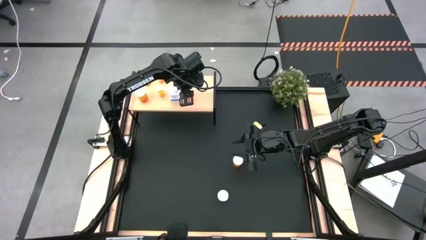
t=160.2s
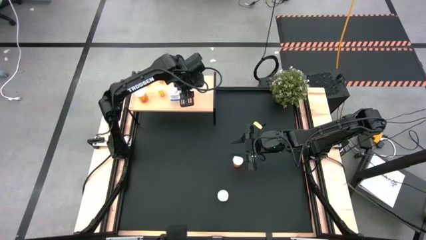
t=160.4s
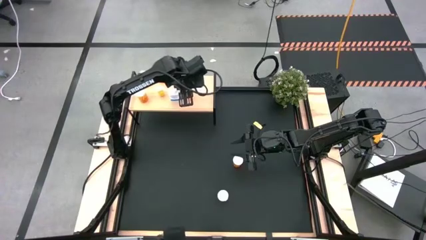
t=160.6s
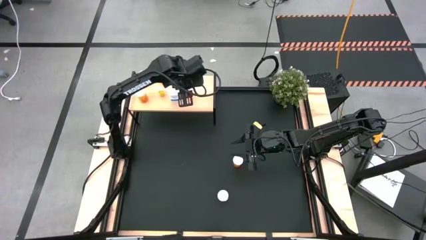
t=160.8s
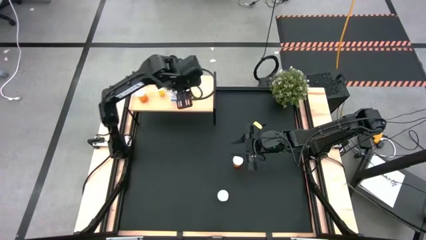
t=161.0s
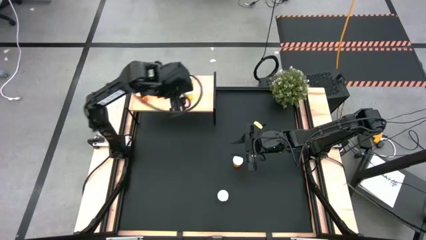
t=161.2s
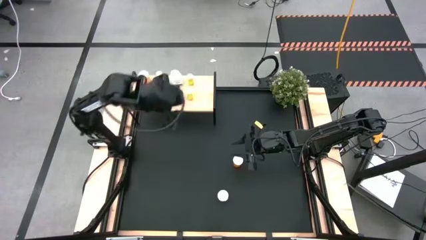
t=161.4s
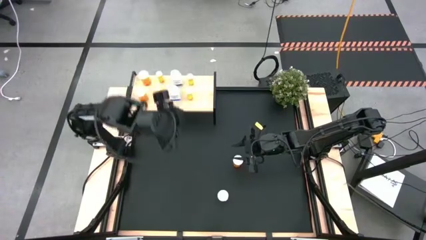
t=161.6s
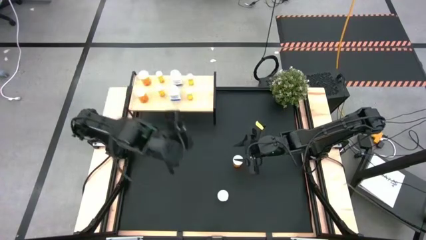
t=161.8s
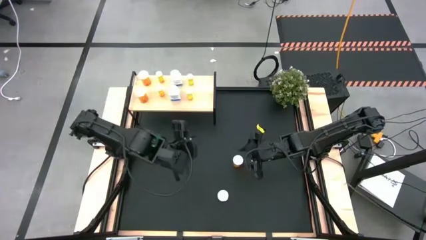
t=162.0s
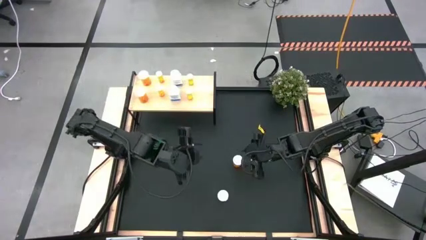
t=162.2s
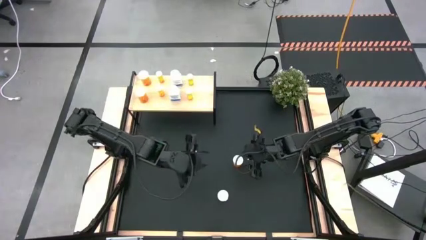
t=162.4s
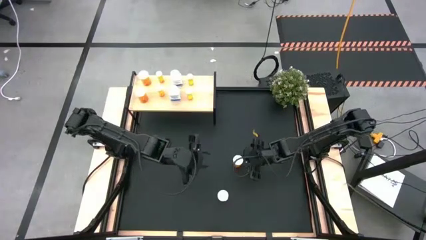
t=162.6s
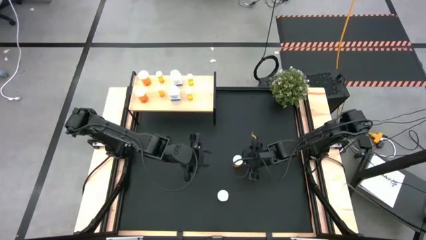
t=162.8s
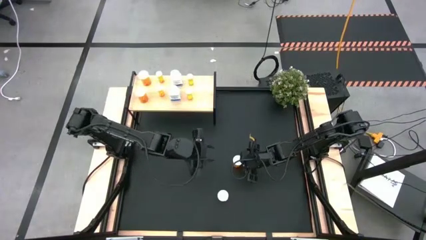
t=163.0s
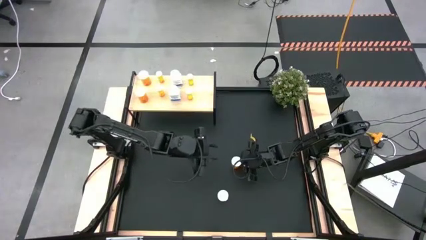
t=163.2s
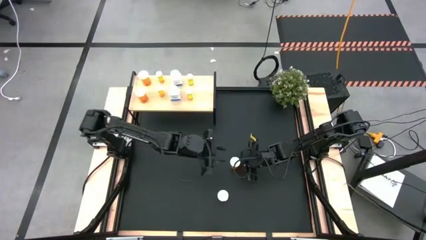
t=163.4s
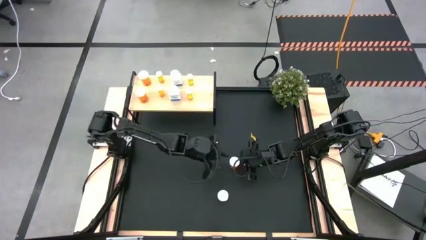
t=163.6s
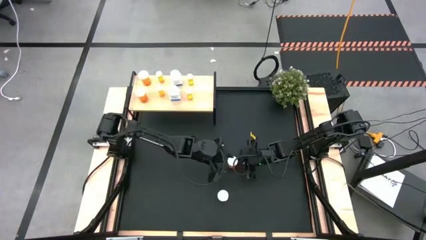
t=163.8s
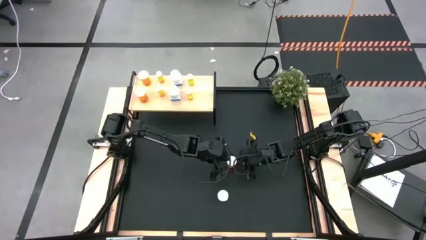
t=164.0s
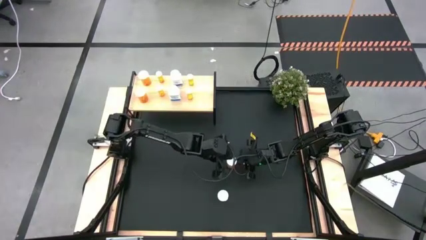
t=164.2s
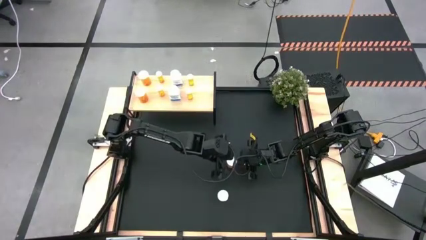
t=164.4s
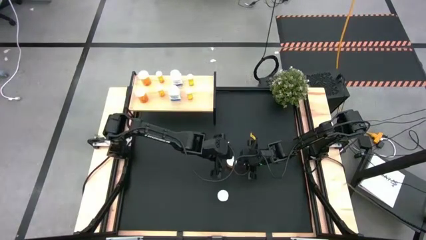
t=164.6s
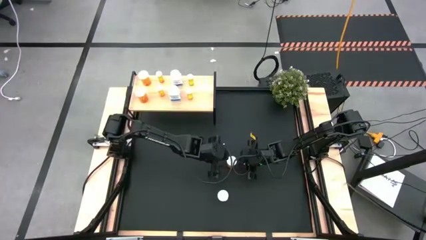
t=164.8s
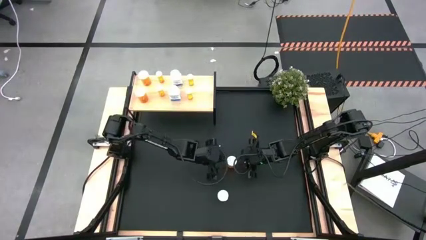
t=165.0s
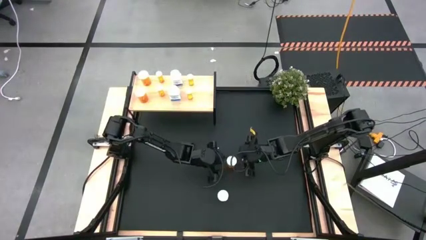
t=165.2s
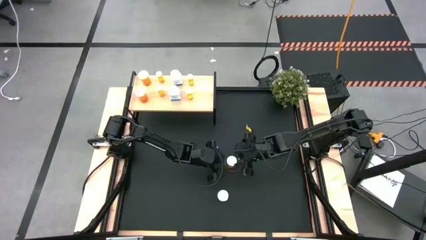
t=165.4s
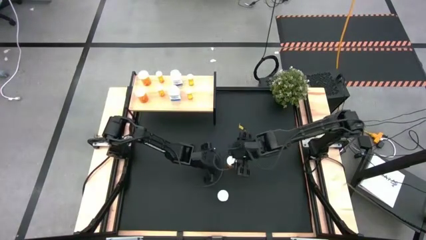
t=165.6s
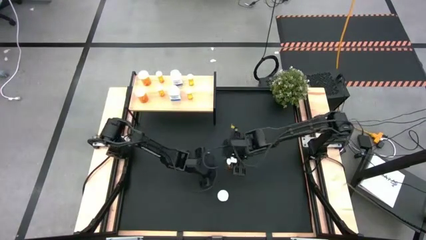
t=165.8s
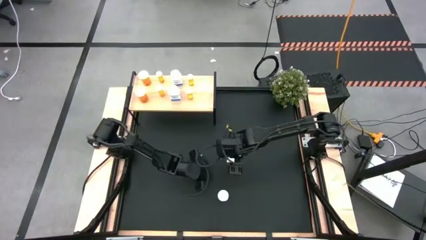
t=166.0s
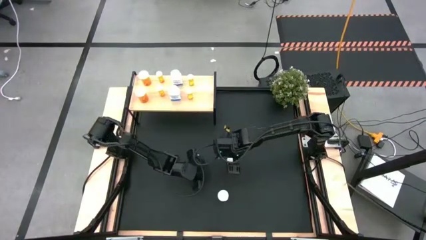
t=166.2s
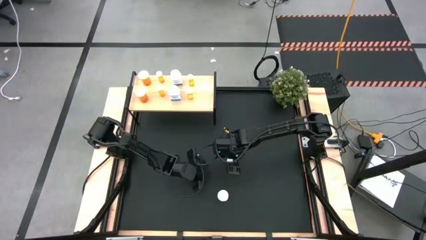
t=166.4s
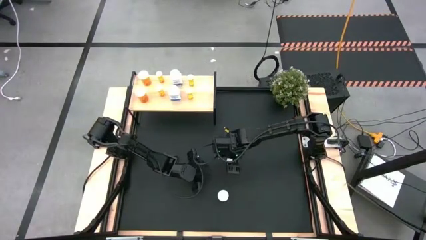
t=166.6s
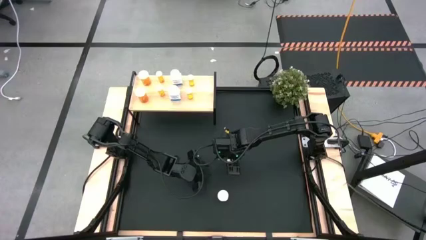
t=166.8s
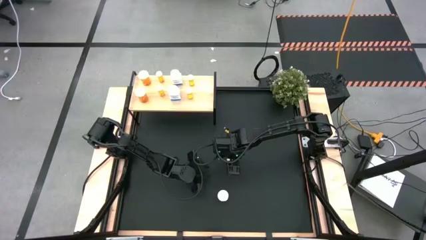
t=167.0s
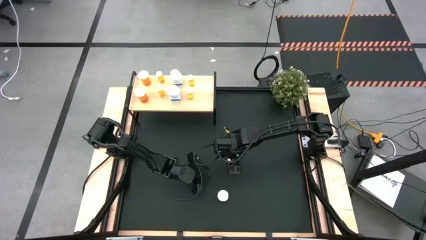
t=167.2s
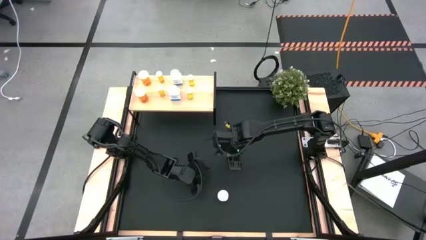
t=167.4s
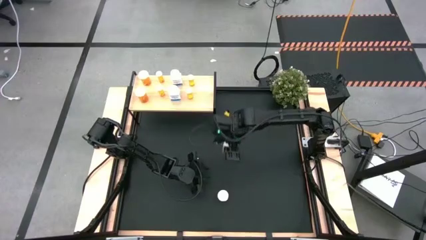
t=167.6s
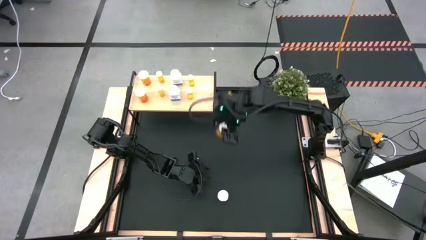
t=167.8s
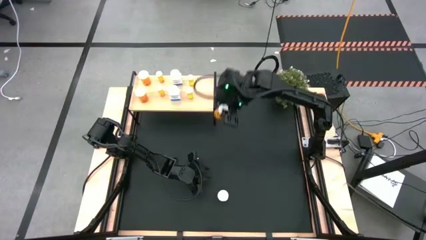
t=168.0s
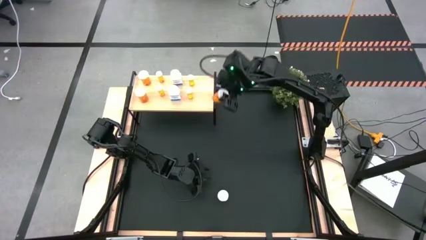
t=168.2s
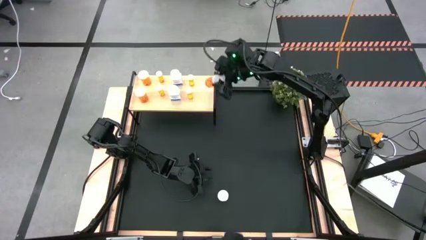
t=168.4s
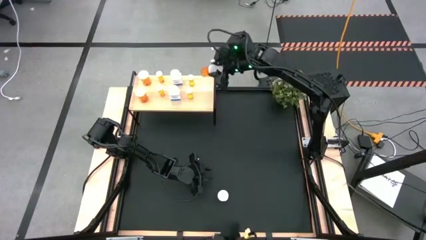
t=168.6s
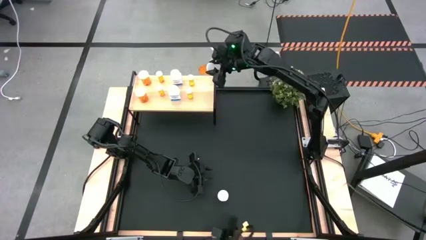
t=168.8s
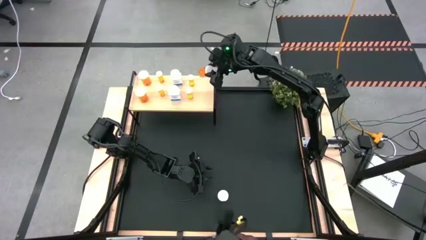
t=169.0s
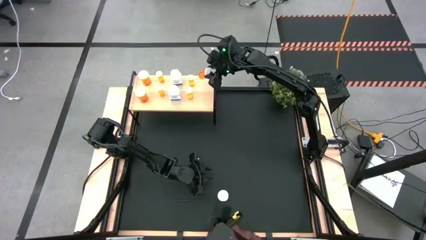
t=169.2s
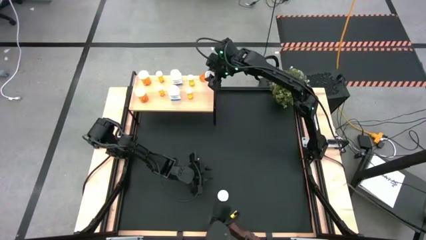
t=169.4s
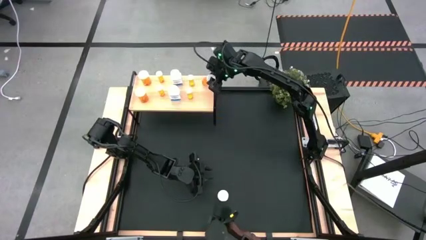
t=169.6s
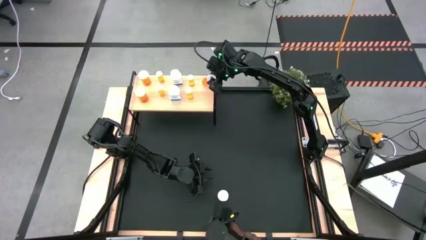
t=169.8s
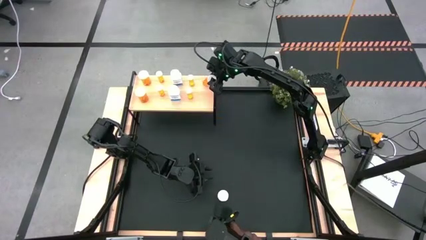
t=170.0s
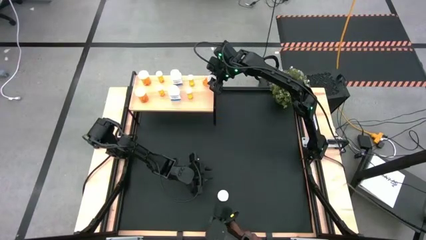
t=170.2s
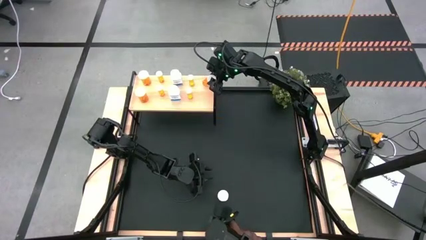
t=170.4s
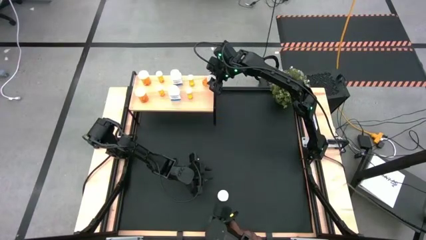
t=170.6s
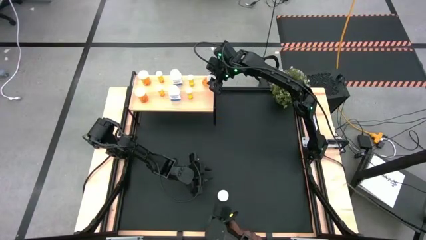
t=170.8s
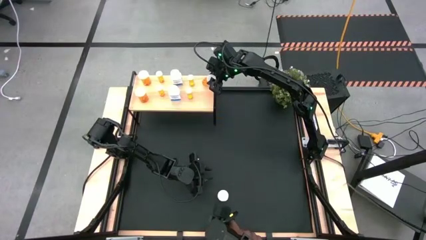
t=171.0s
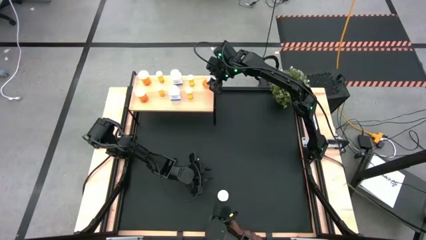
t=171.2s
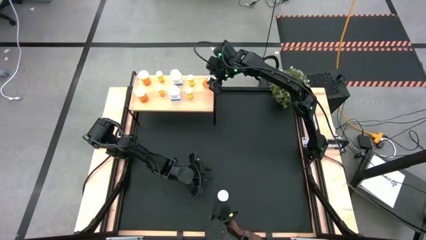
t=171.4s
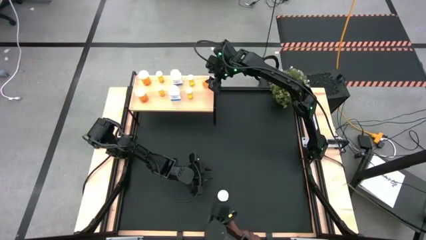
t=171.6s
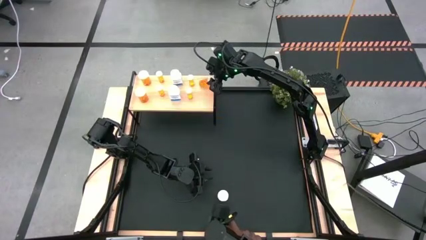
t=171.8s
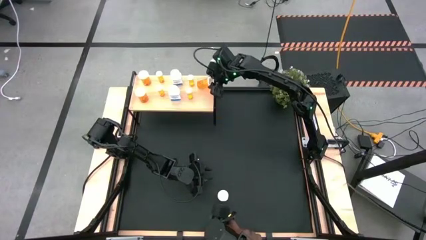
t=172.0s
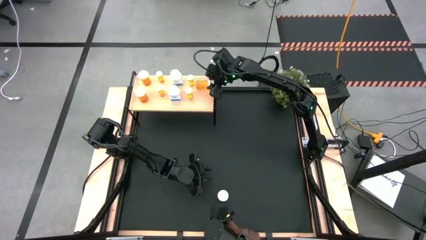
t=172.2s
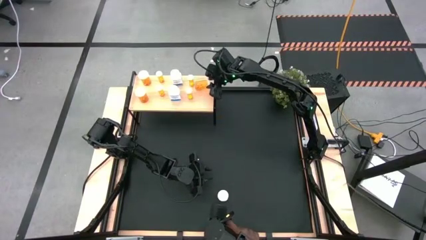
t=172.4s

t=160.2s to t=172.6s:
Task: Pick and place medicine bottles onto shelf by color
Put the large orange pill bottle on the shelf
